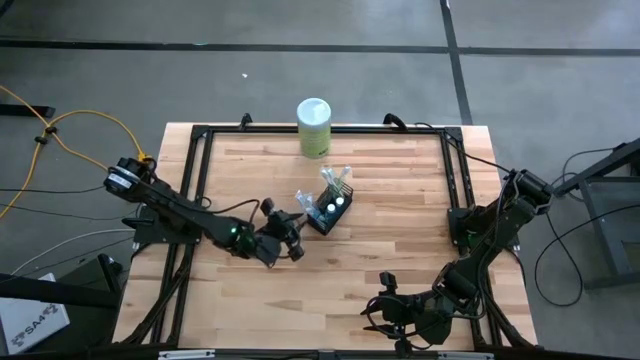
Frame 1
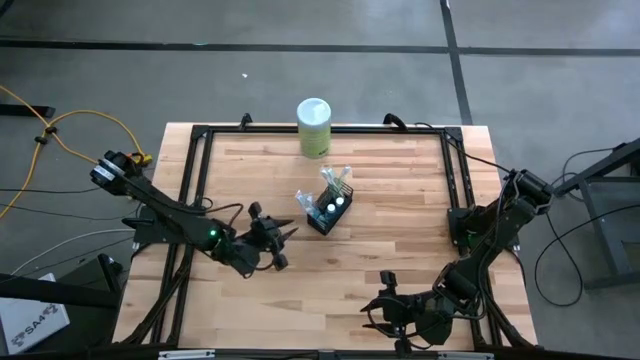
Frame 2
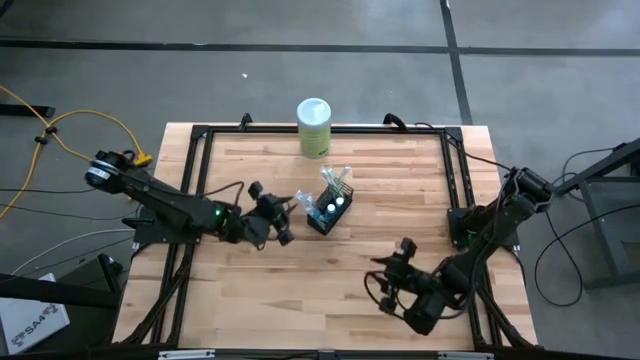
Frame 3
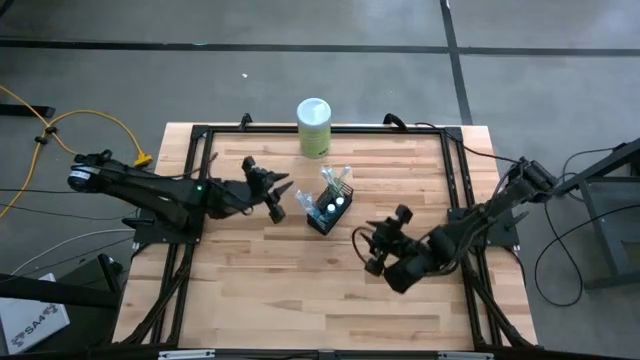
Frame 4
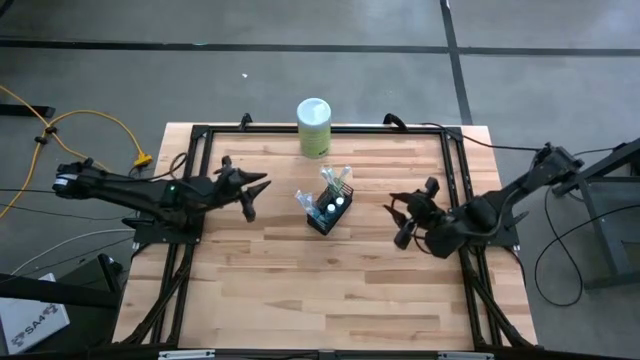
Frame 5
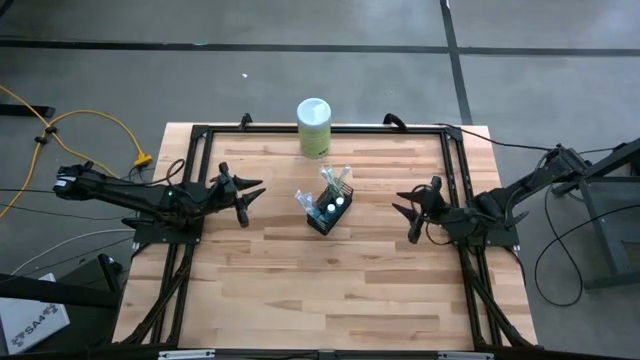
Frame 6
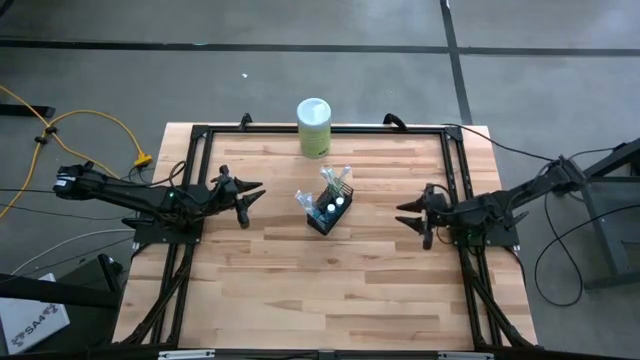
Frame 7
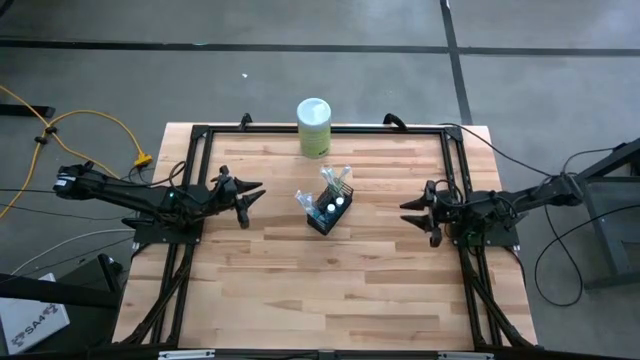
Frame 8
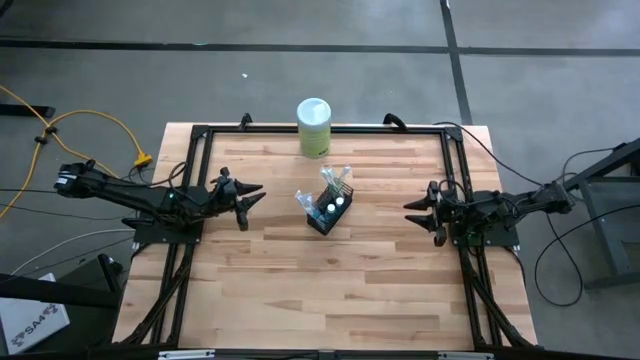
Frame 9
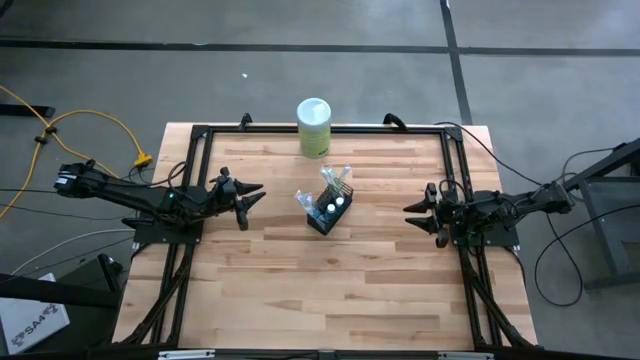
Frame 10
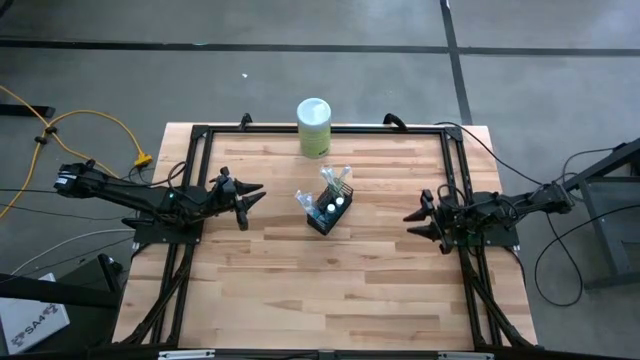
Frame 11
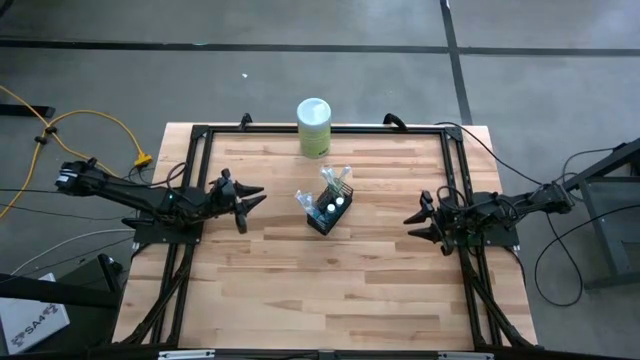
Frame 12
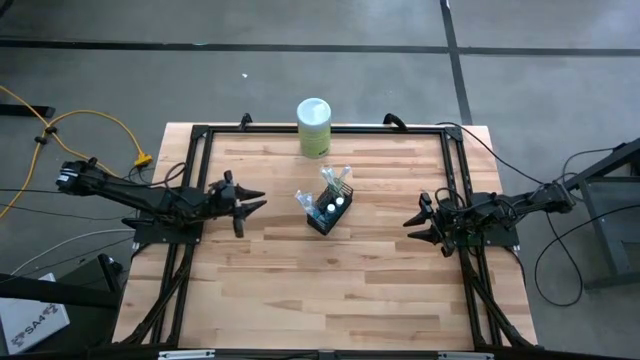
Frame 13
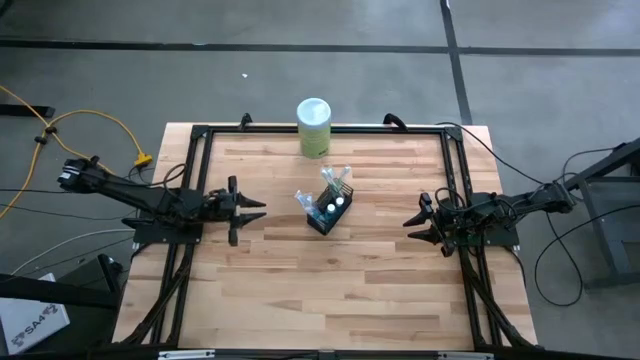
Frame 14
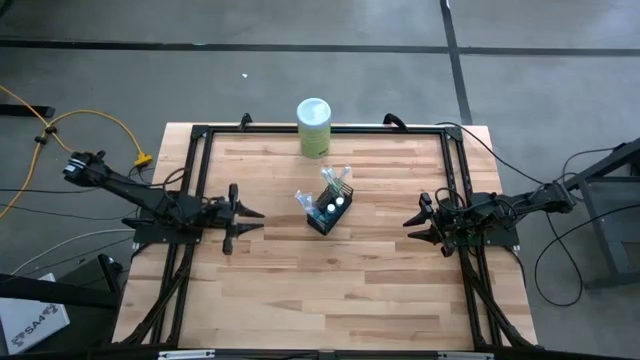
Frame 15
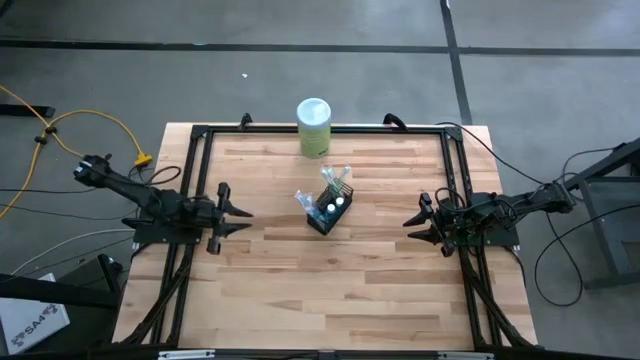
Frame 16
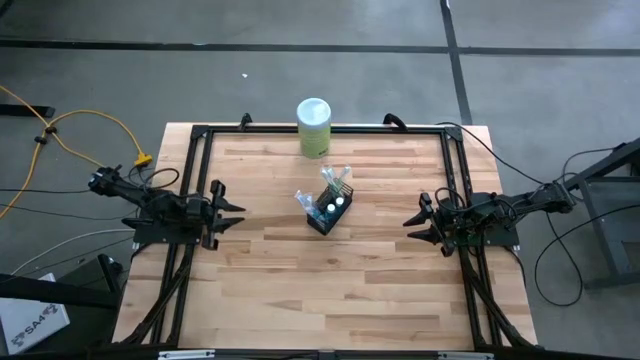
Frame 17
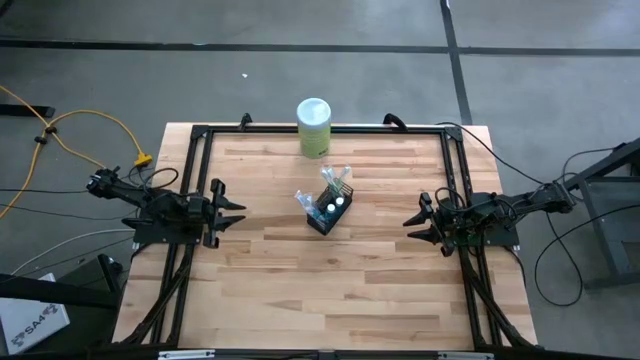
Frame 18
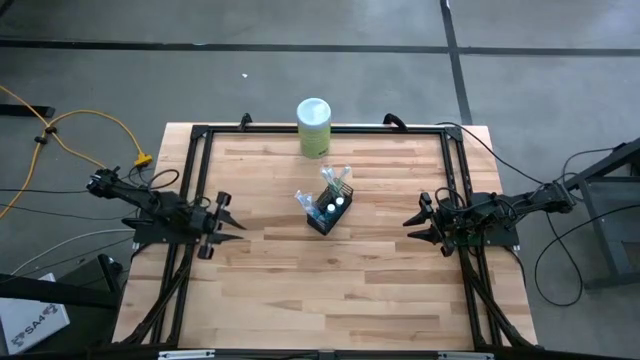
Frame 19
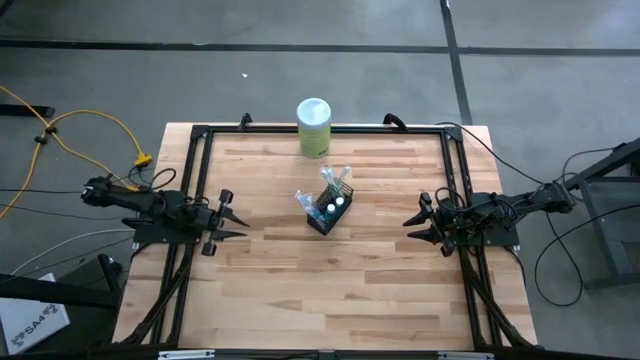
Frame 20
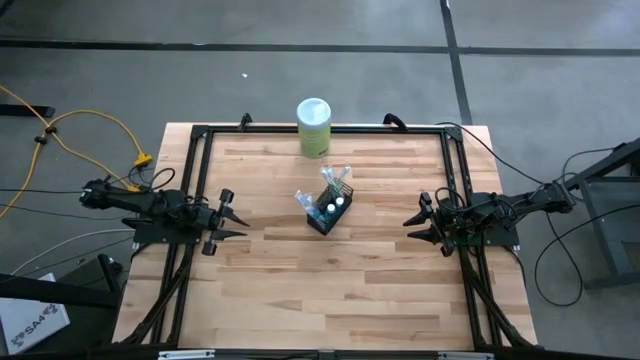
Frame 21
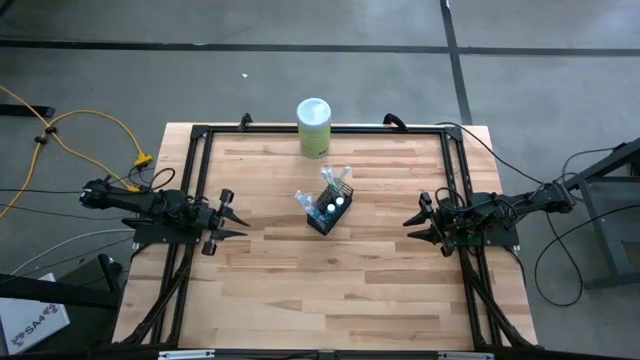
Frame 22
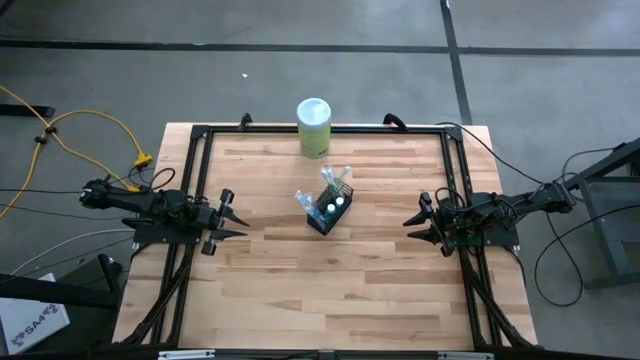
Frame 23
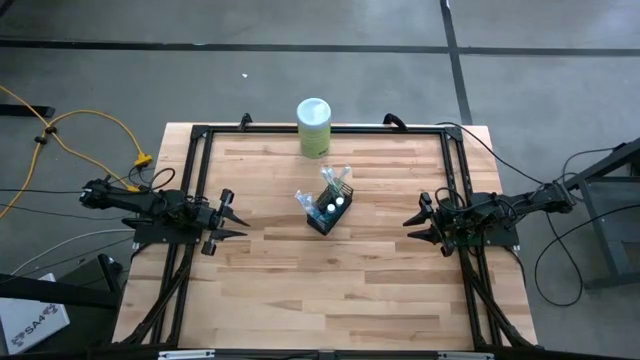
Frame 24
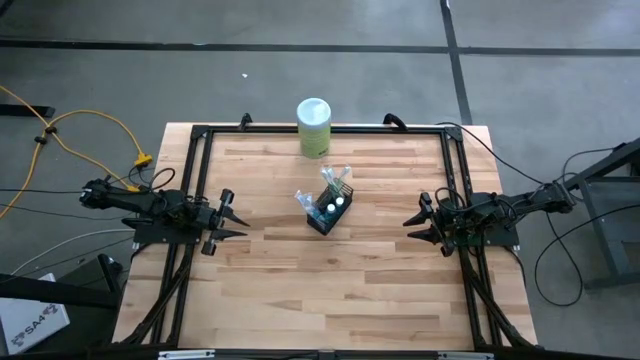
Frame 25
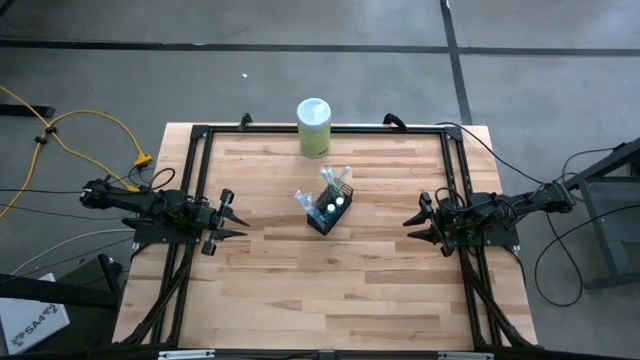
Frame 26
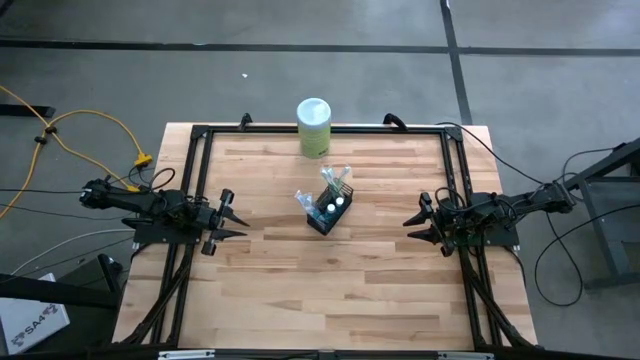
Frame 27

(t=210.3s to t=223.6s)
Task: Pick & Place toothbrushing station
Return to Home Position
